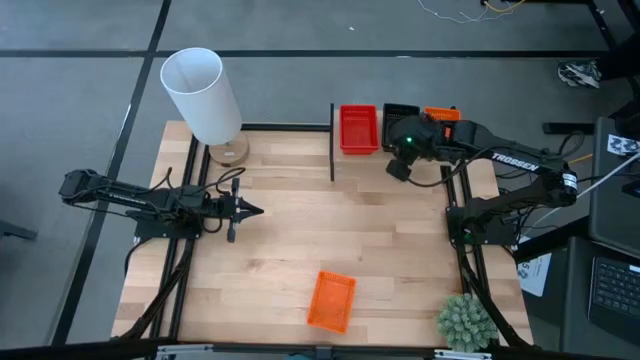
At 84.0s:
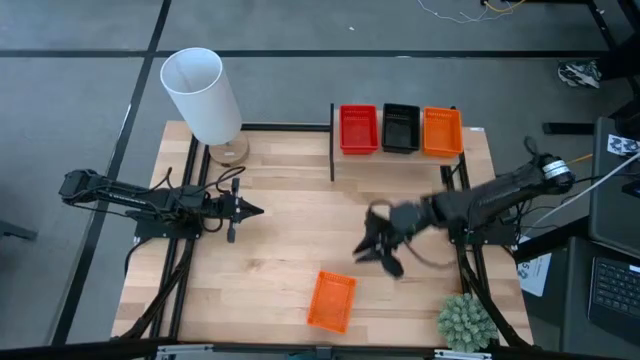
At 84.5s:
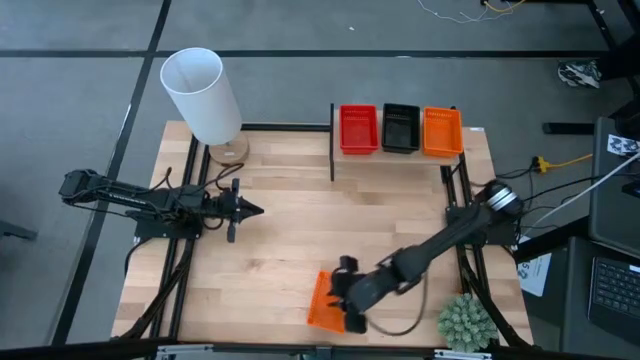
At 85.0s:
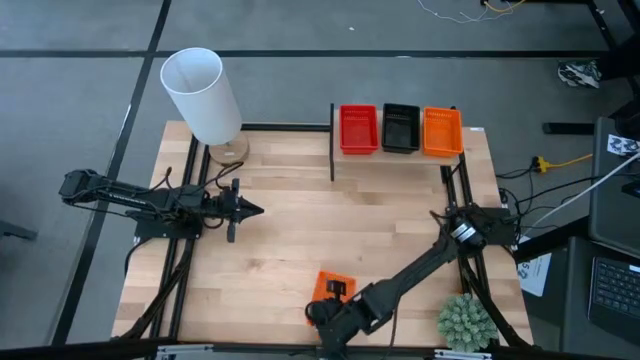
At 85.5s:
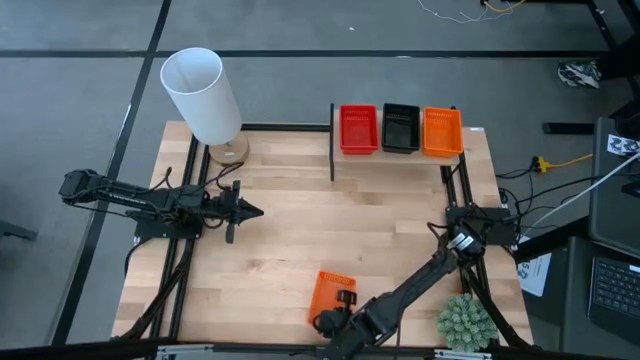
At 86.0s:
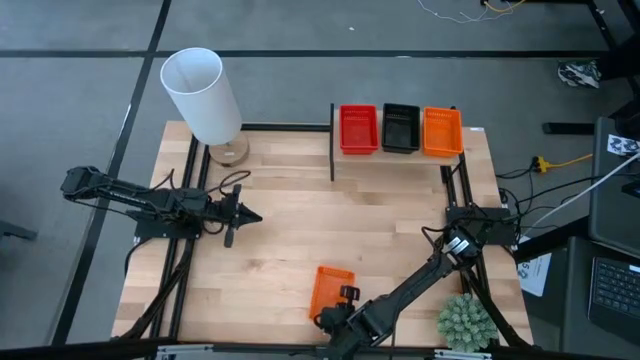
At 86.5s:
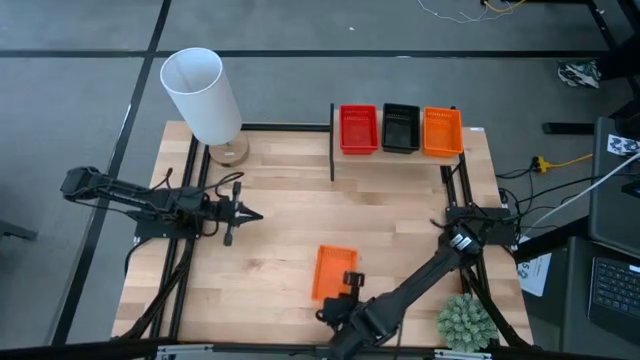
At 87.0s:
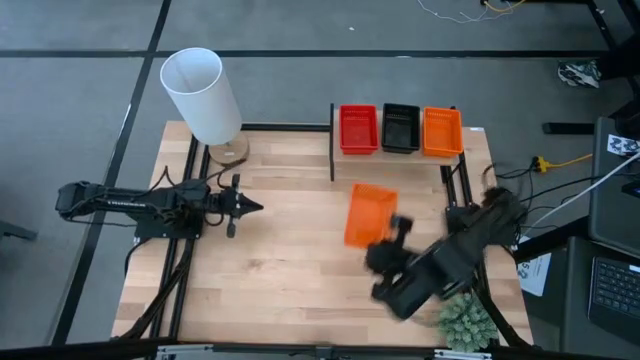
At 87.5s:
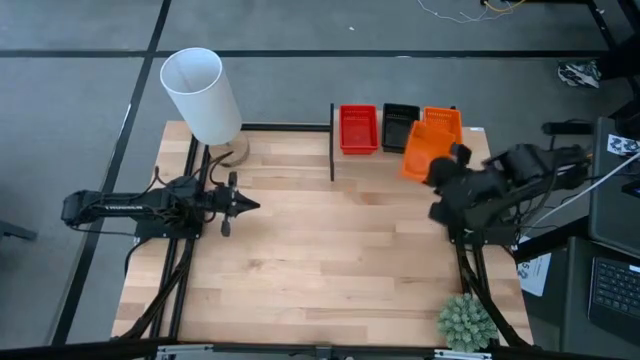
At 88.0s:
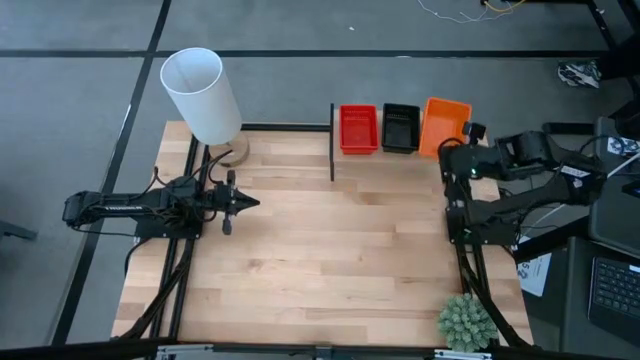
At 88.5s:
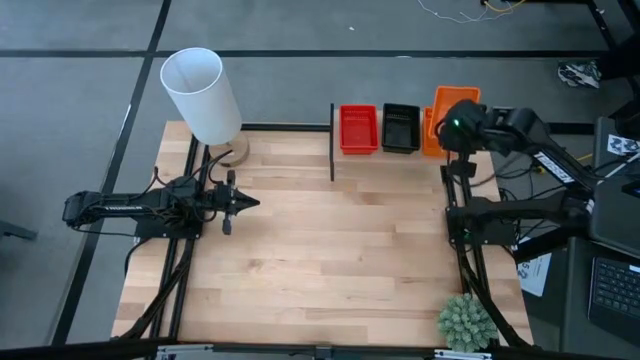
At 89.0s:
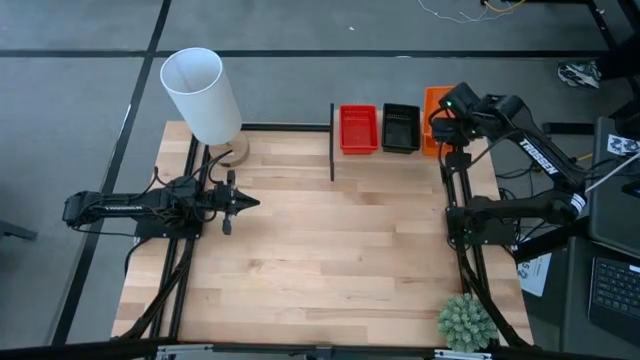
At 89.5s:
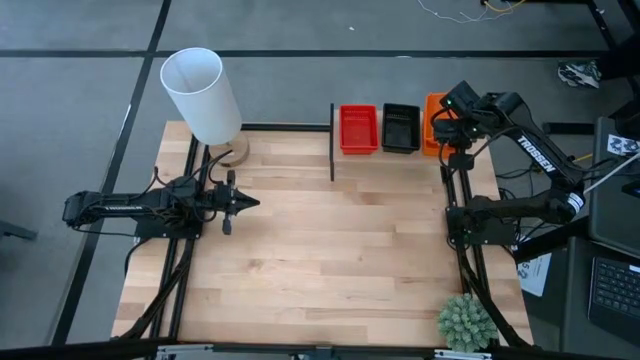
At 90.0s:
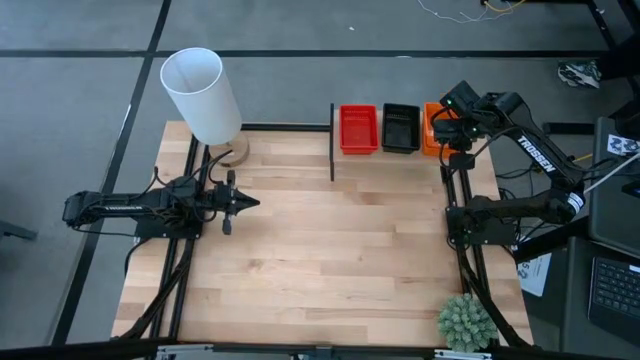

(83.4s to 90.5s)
Task: Stack baskets on shelf by color
Stack the orange basket on top of the orange basket on the shelf

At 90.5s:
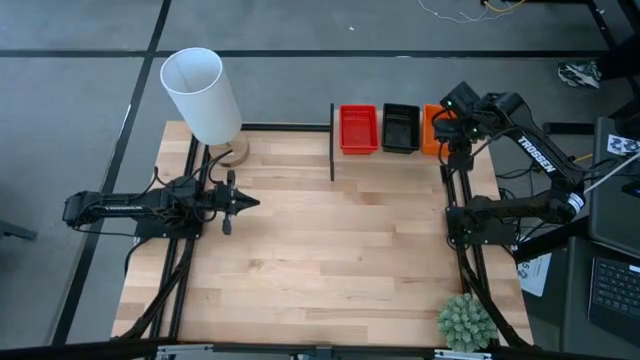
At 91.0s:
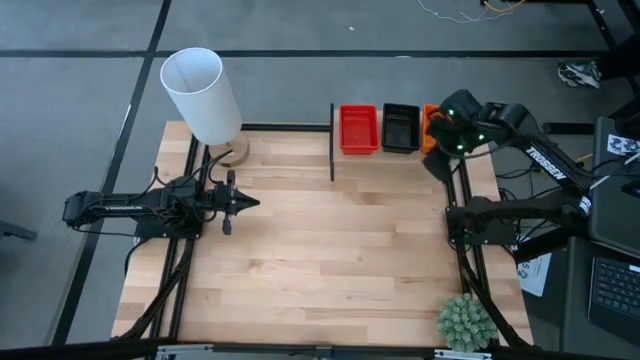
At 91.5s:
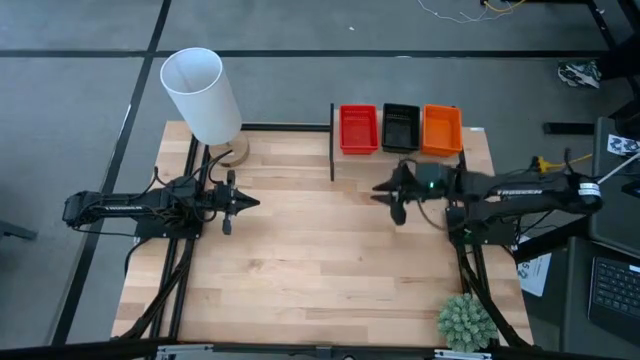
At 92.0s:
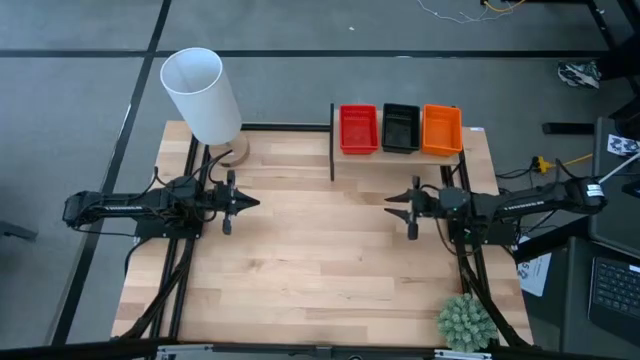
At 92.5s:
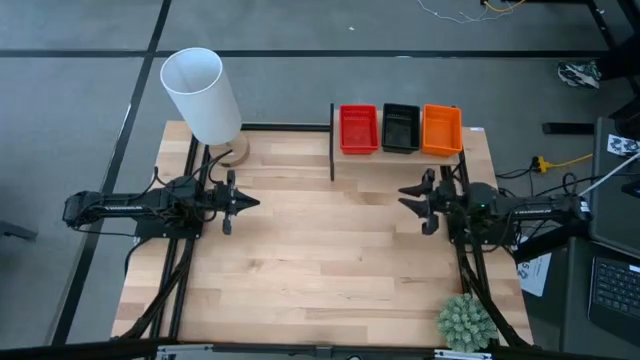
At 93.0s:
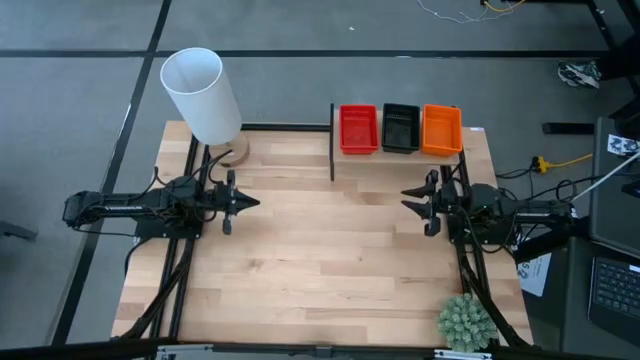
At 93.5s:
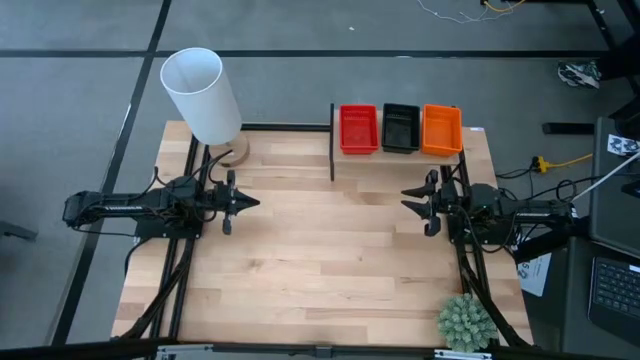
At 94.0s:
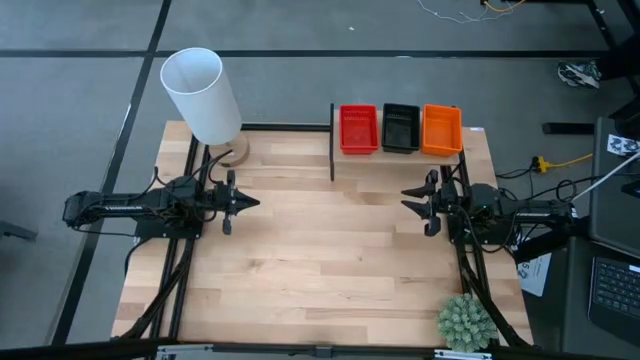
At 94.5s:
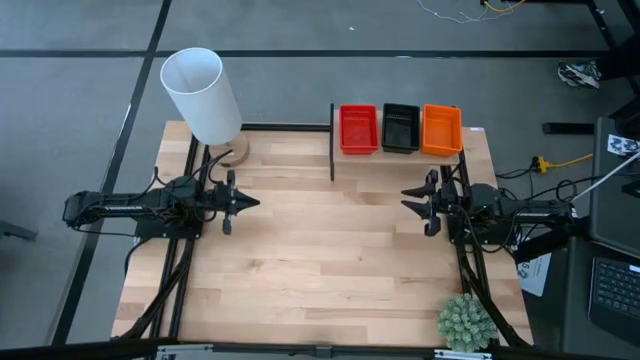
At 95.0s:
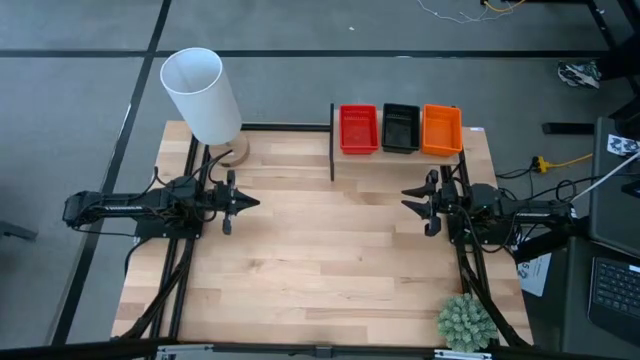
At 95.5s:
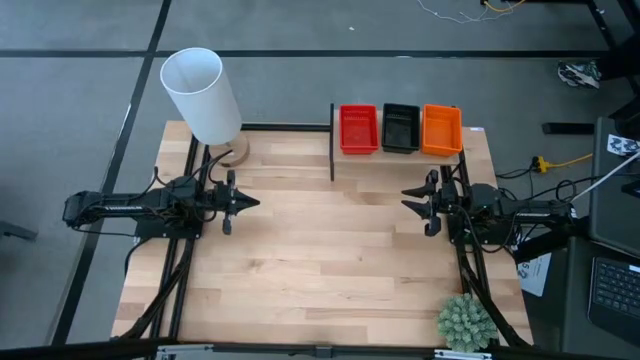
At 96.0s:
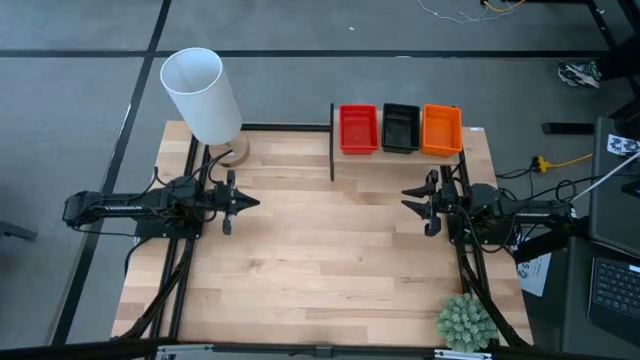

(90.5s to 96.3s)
Return to Home Position

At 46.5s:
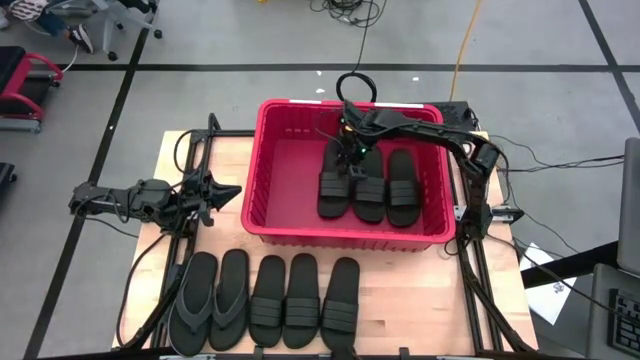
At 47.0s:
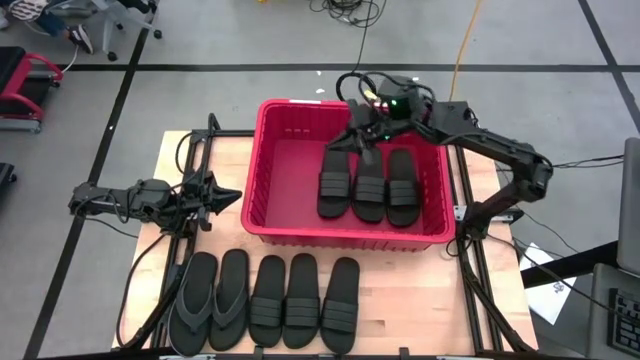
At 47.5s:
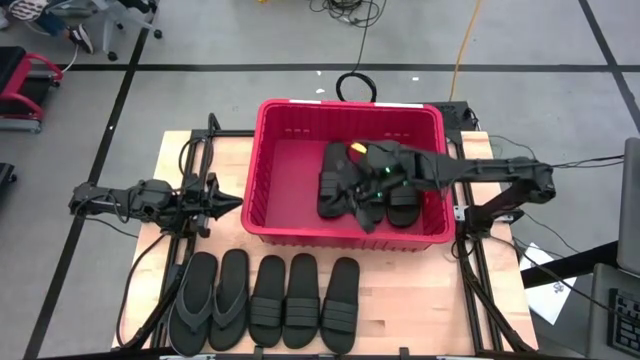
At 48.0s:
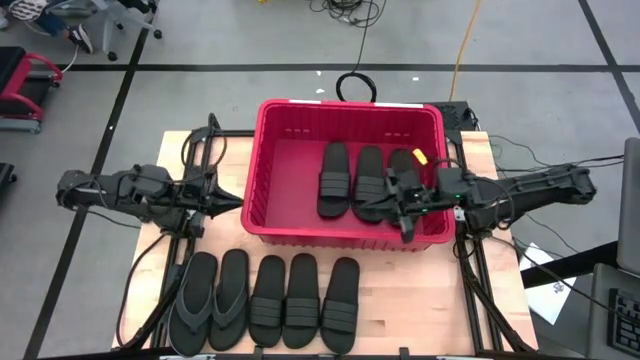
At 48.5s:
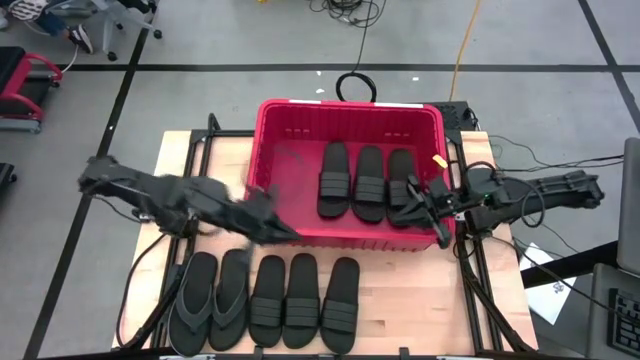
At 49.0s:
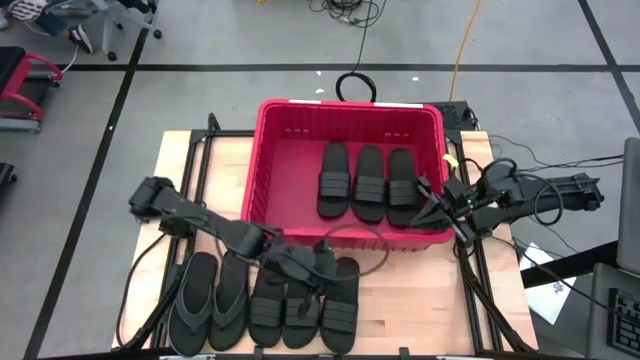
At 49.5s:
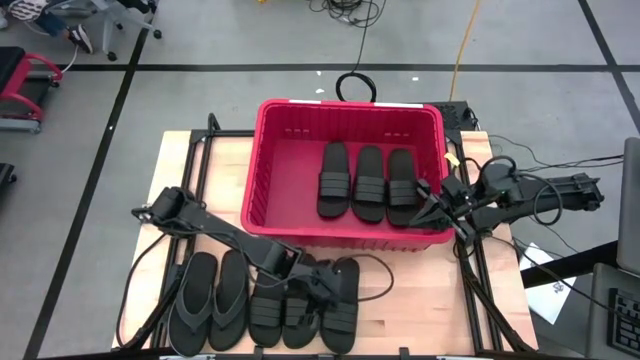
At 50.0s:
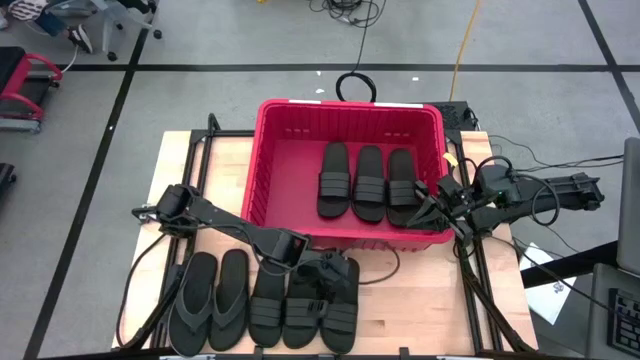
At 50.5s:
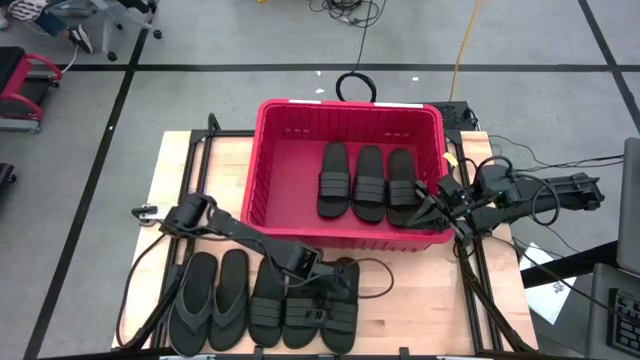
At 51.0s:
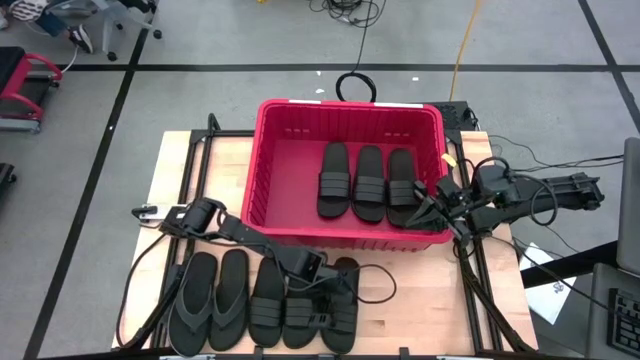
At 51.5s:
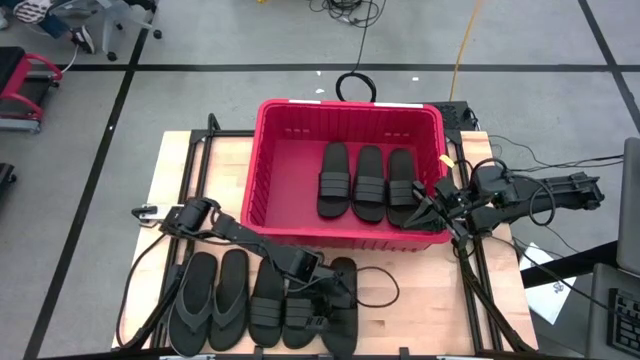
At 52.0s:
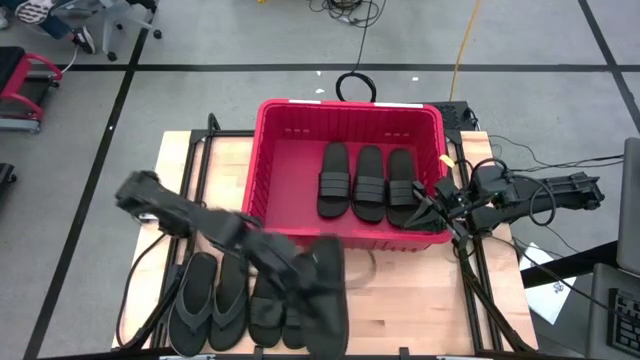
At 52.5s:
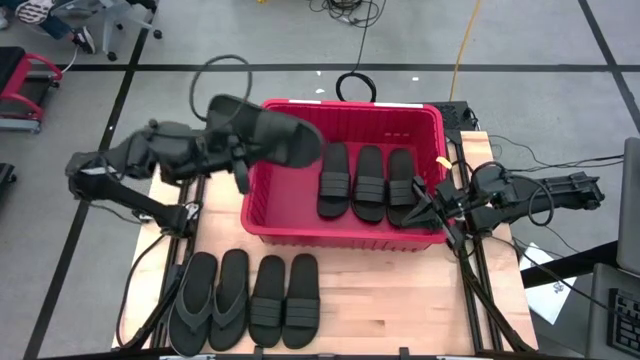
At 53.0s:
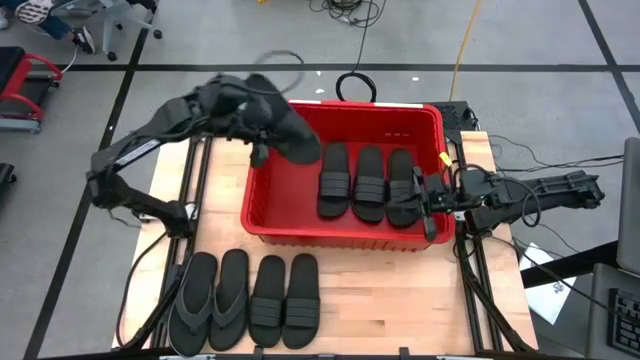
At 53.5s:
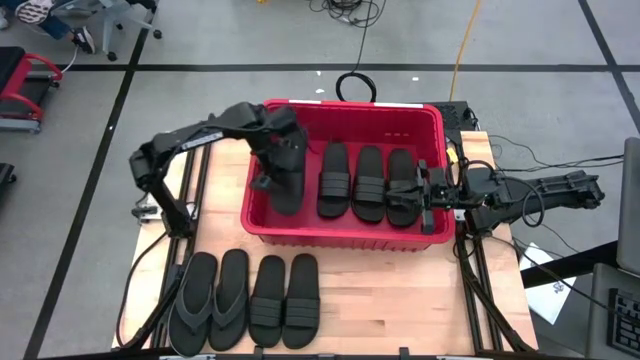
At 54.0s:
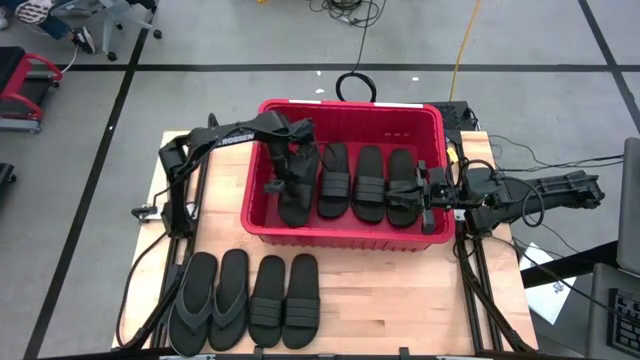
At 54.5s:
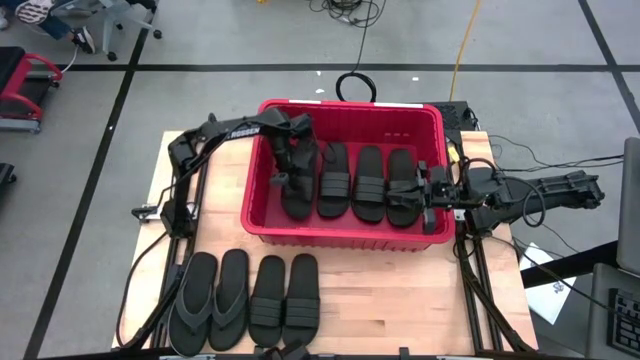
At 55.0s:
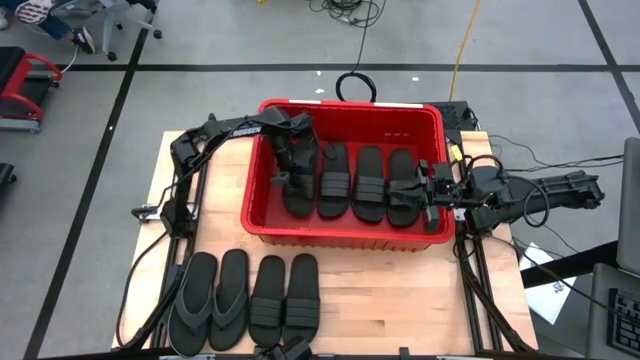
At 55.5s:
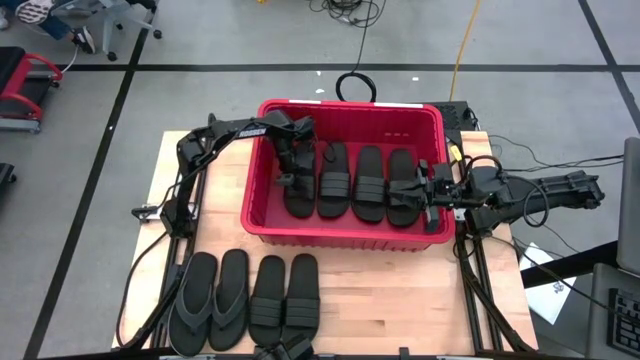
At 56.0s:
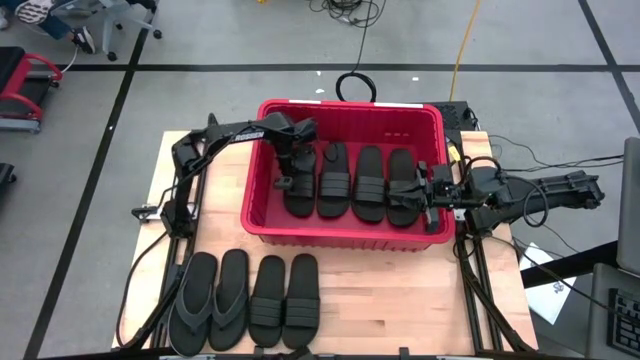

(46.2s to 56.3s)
Task: Pick and place slides into bin
Put the black slide into the red bin
